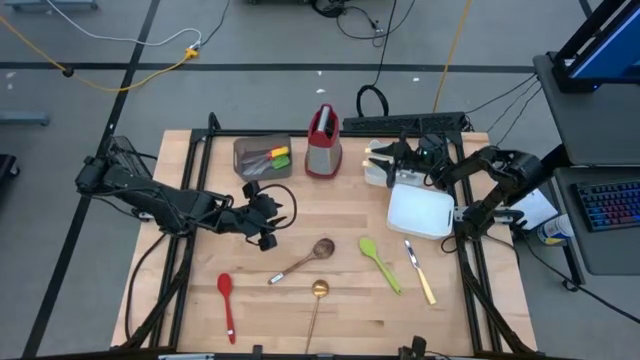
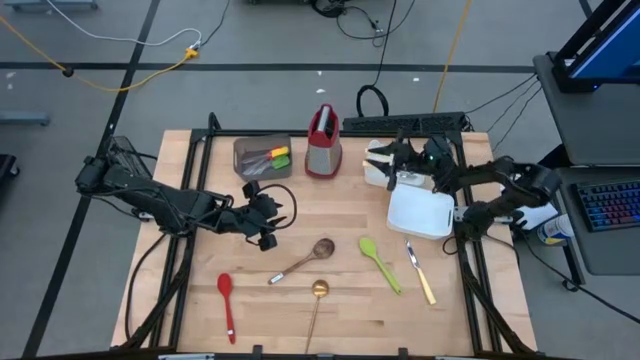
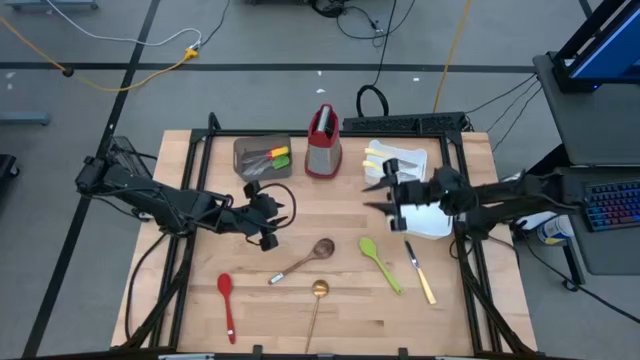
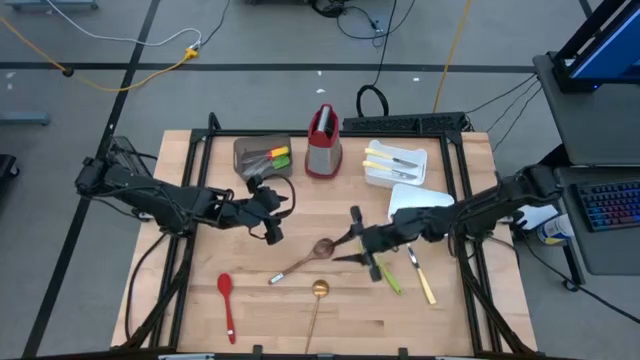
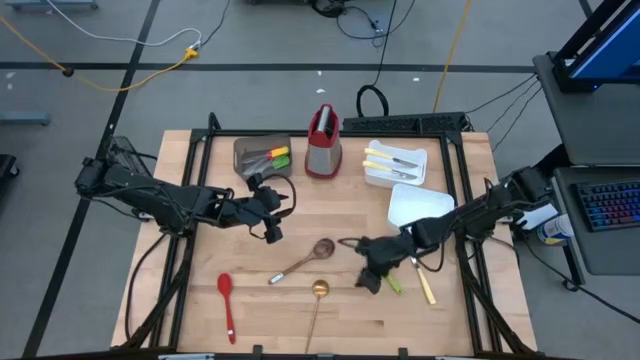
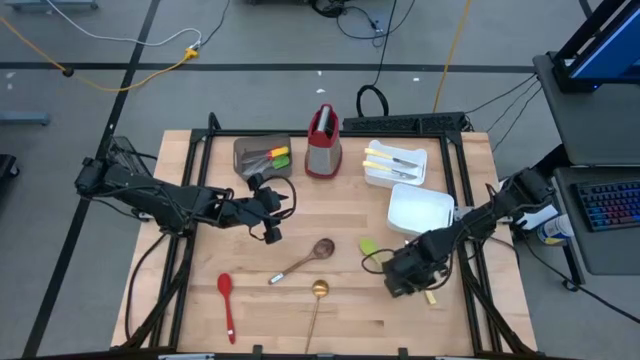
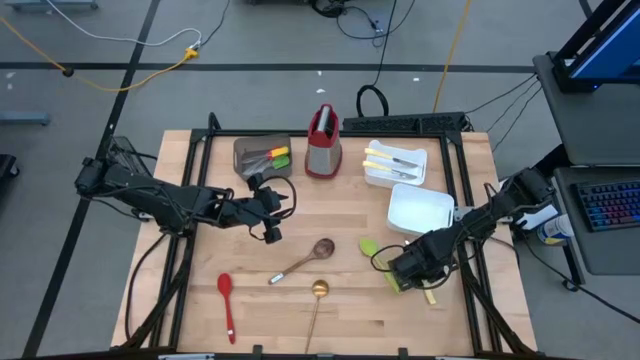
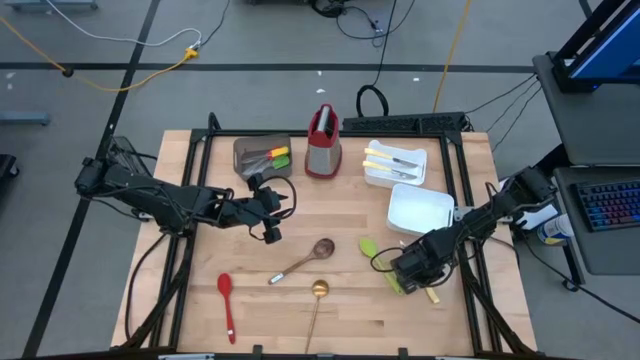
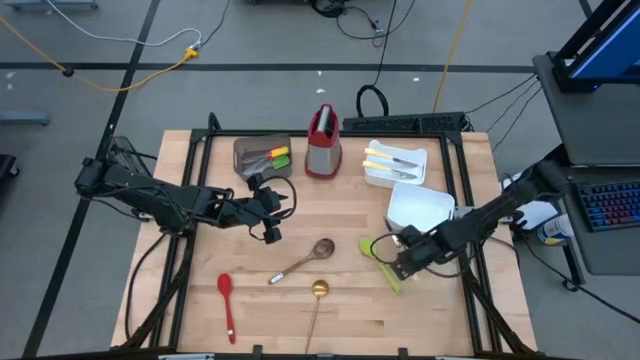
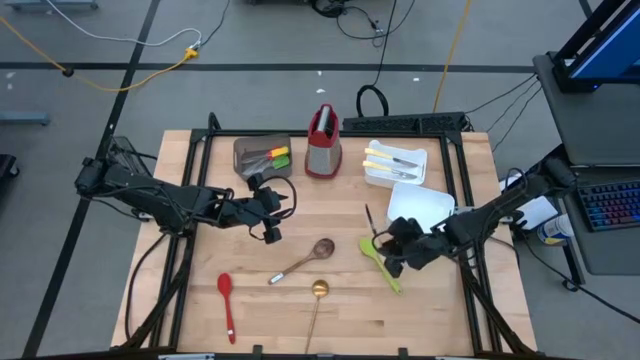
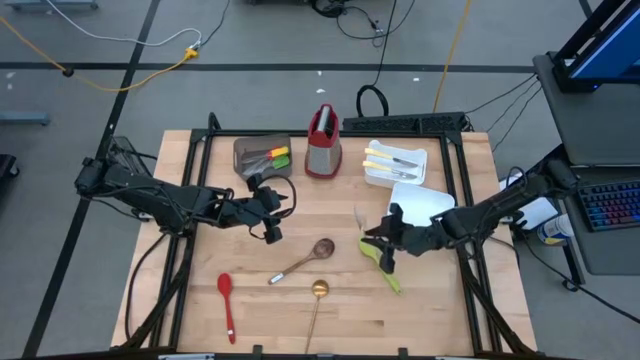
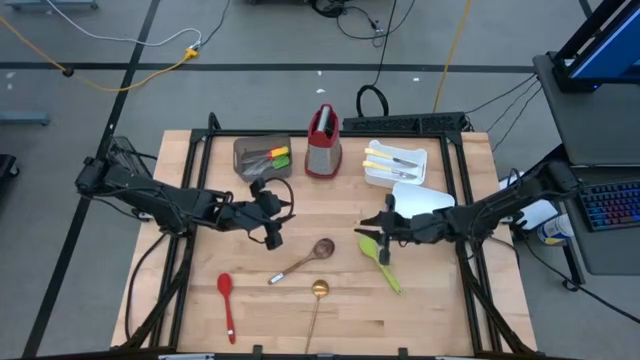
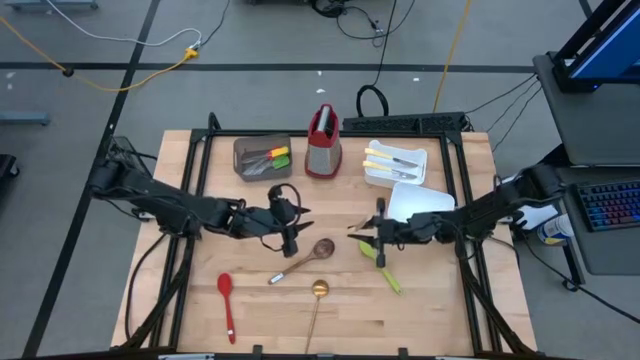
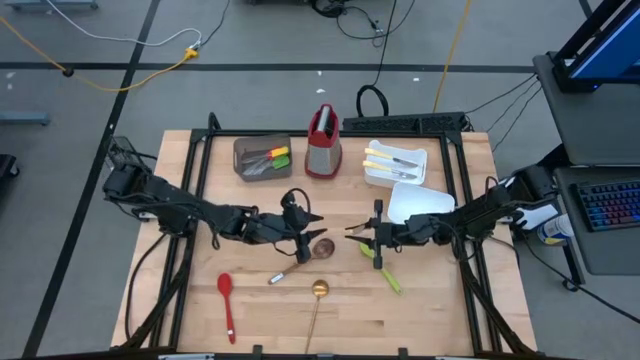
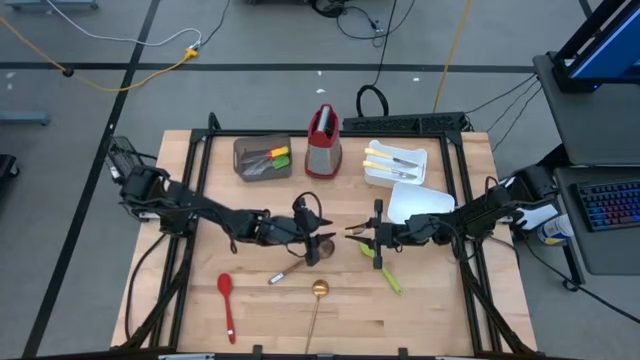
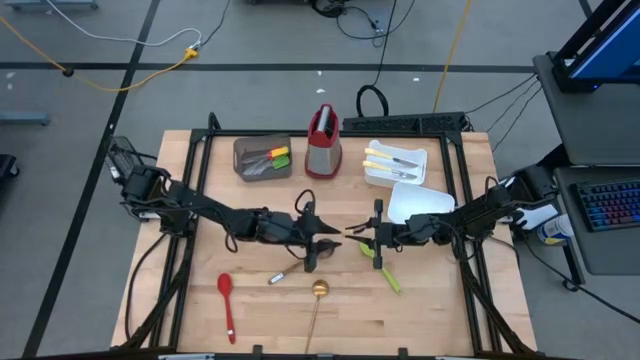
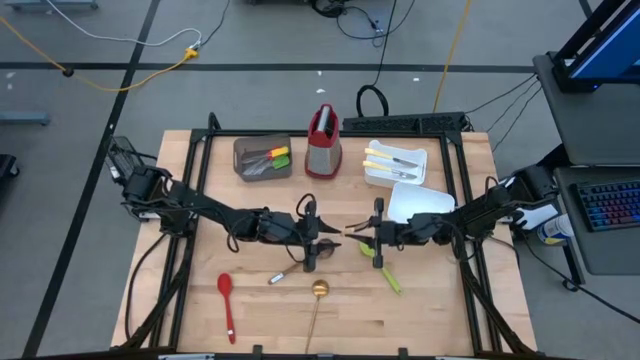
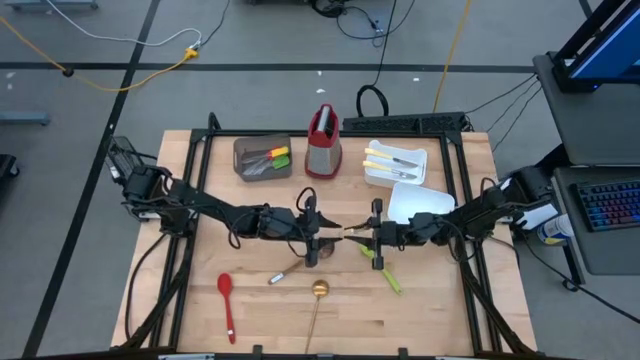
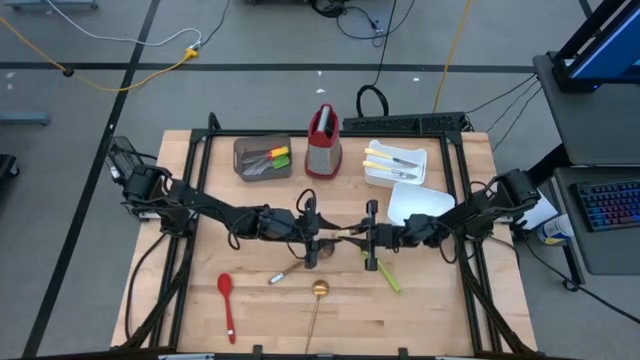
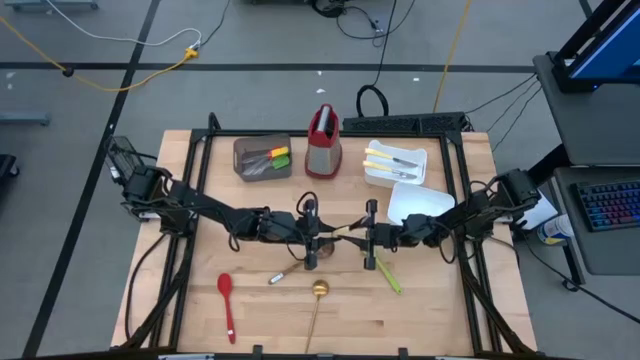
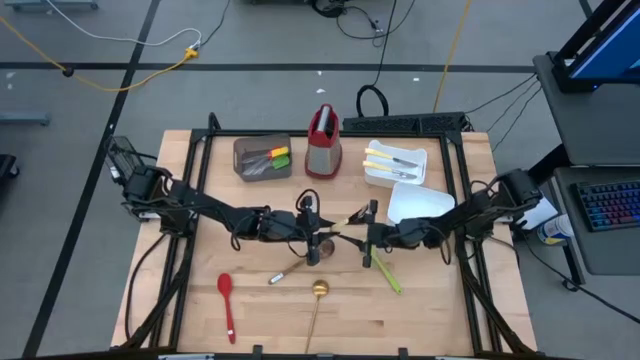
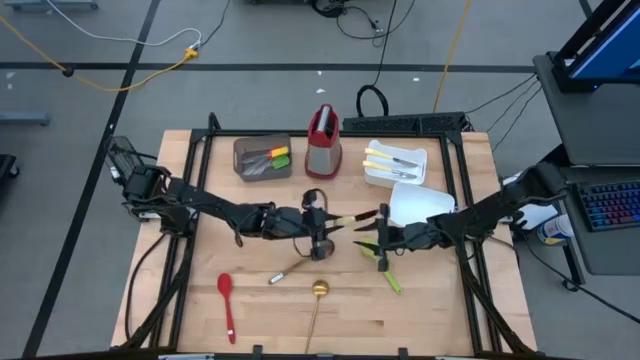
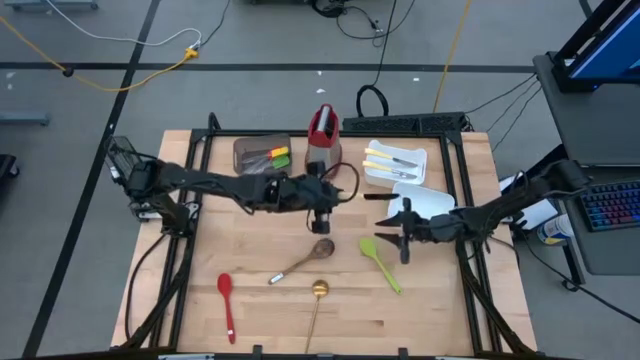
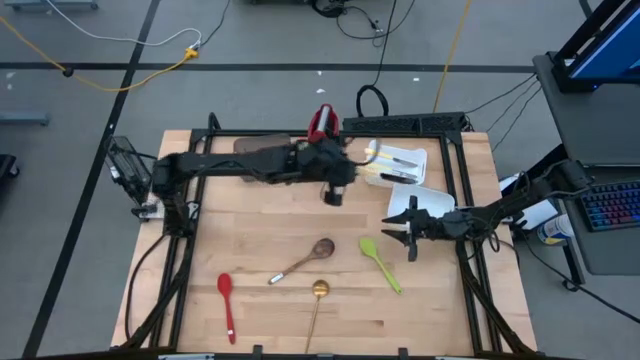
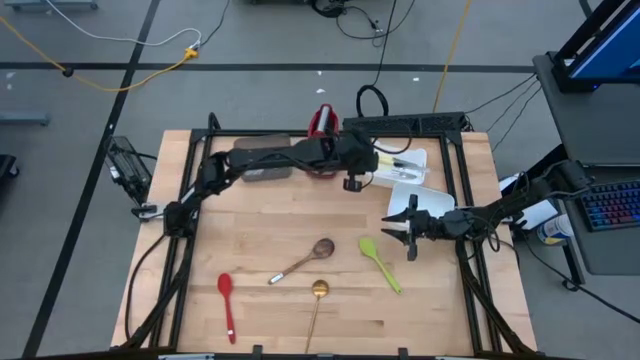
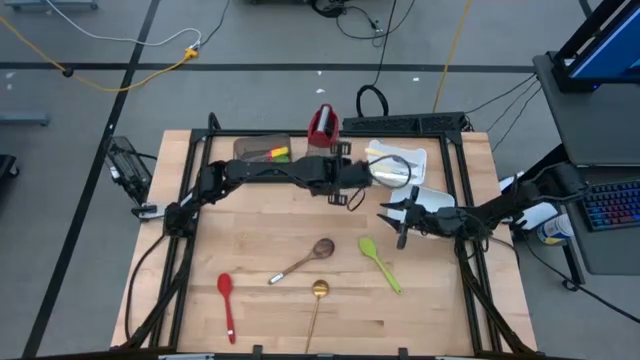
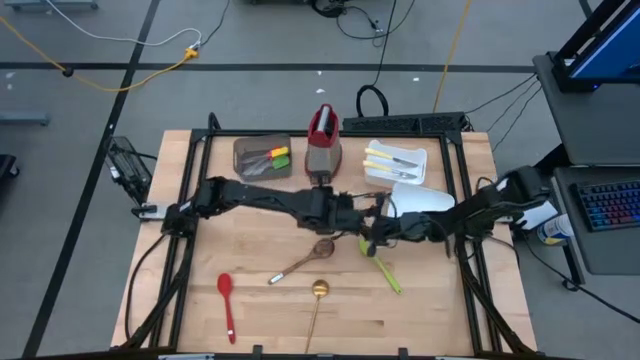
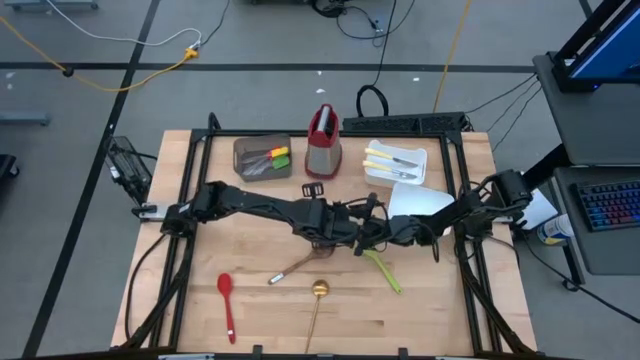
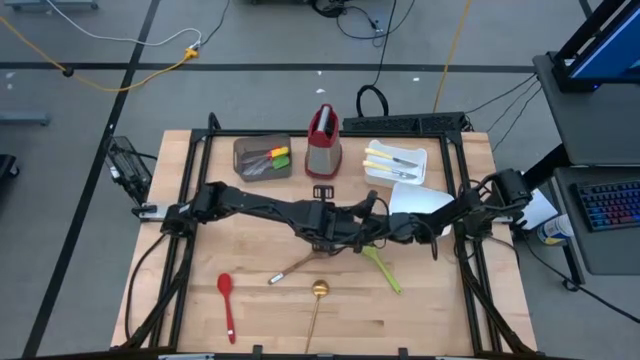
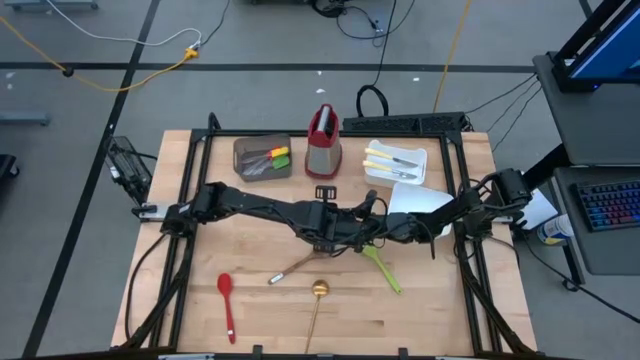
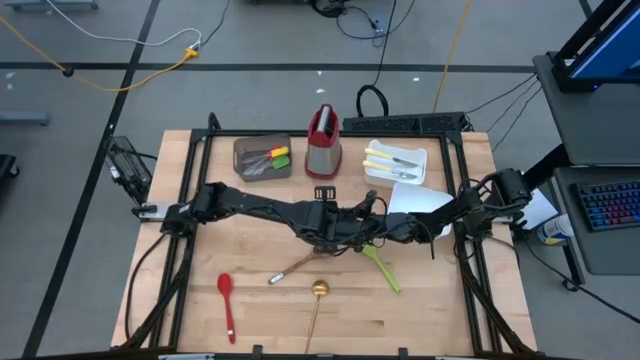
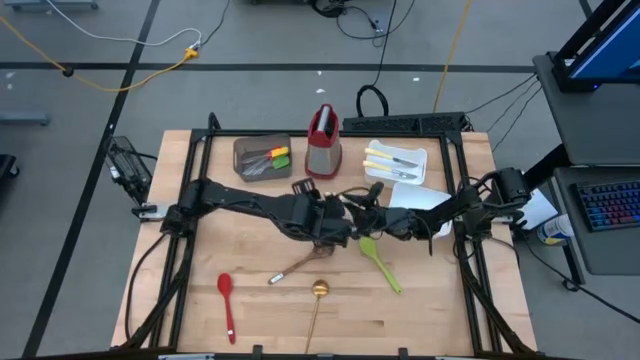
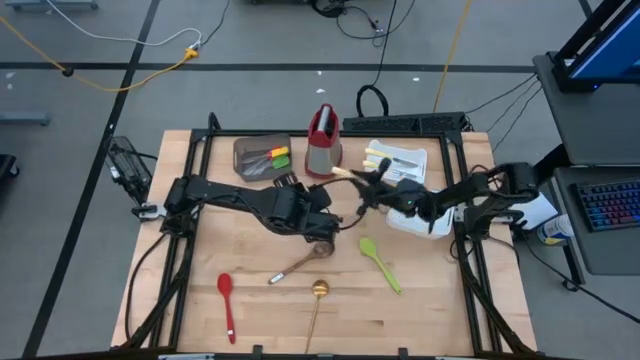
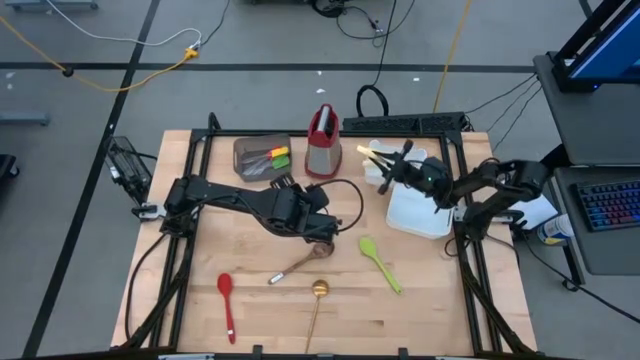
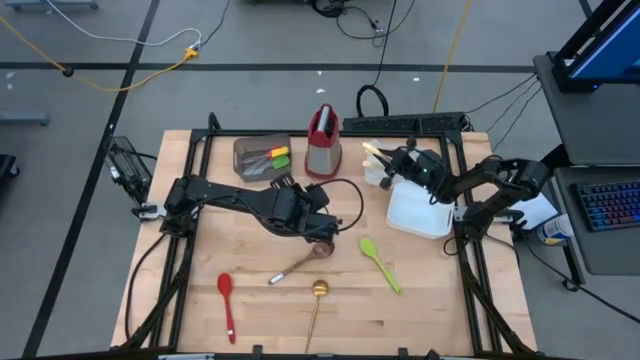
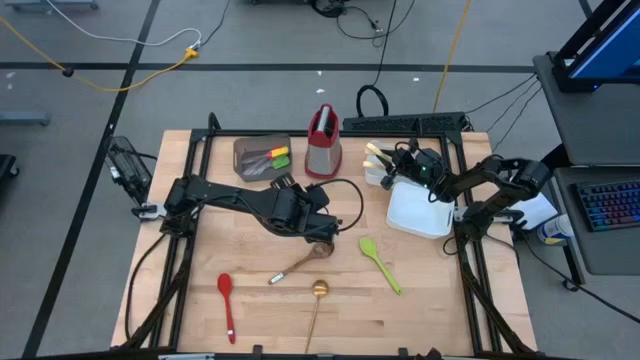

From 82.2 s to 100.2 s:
Task: Pick & Place Kitchen Items
Put the yellow table knife into the top white bin

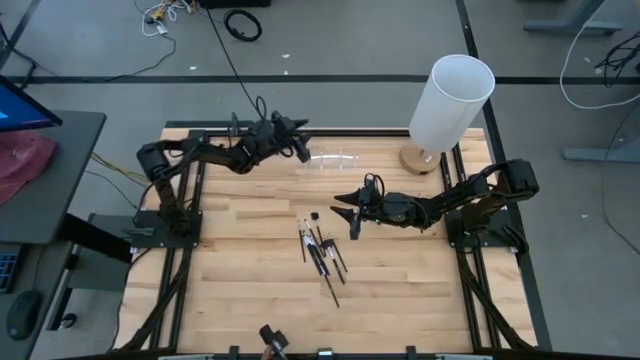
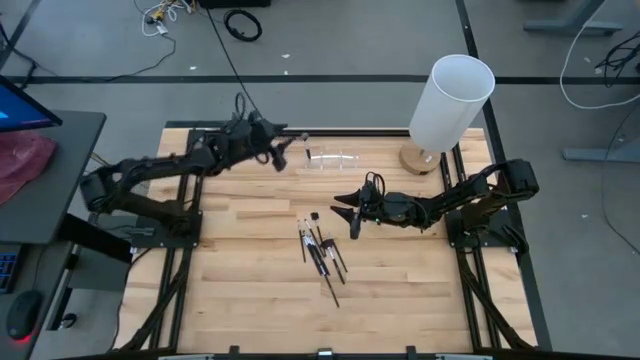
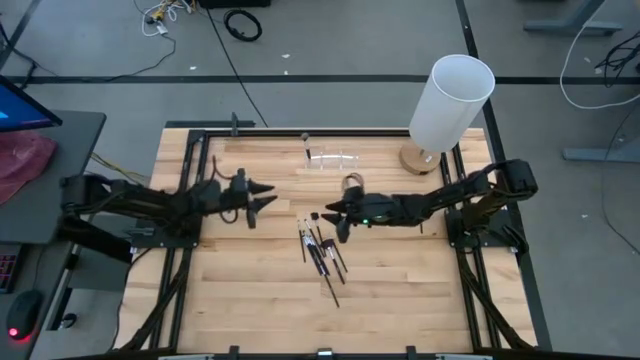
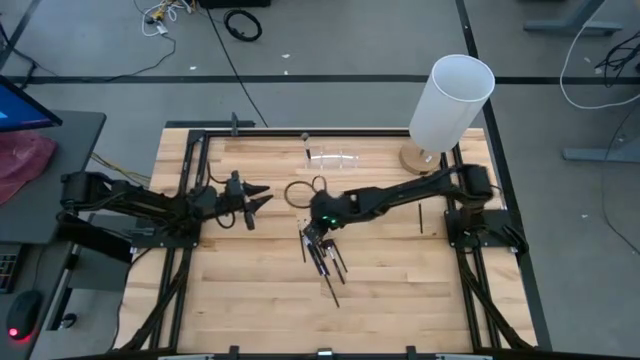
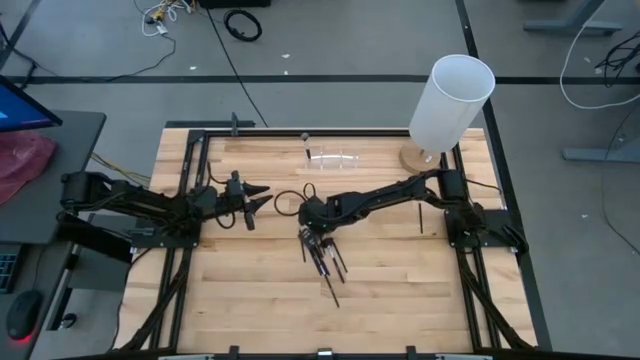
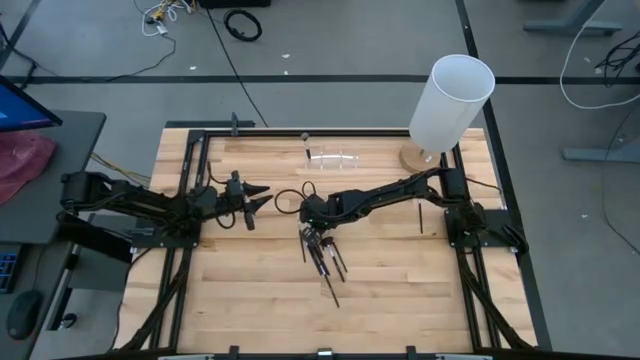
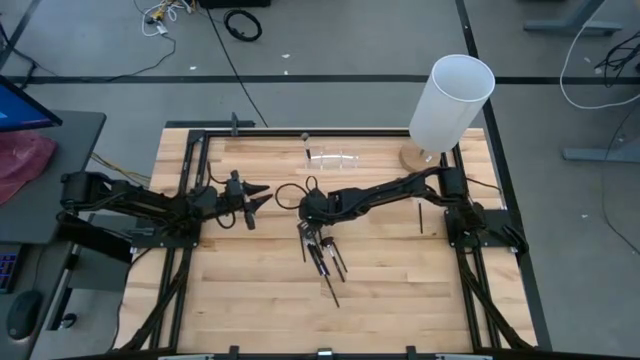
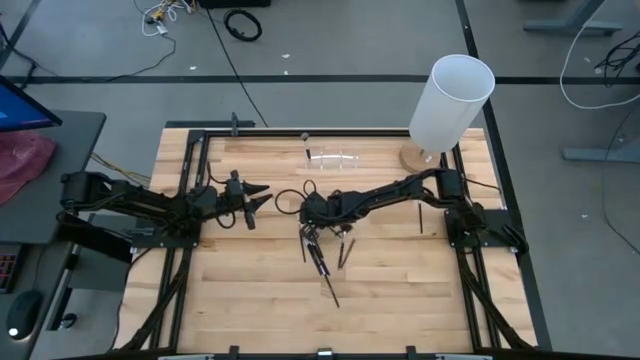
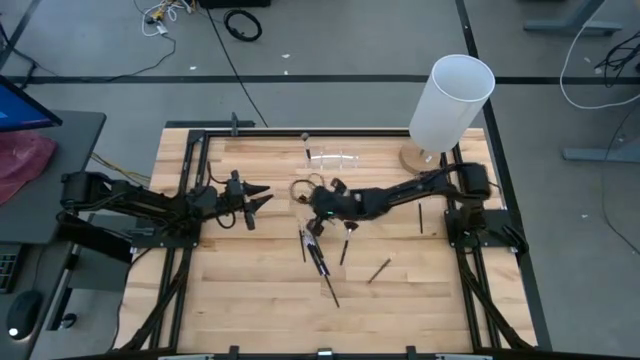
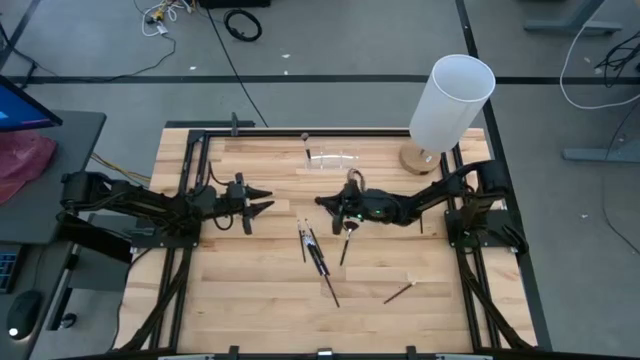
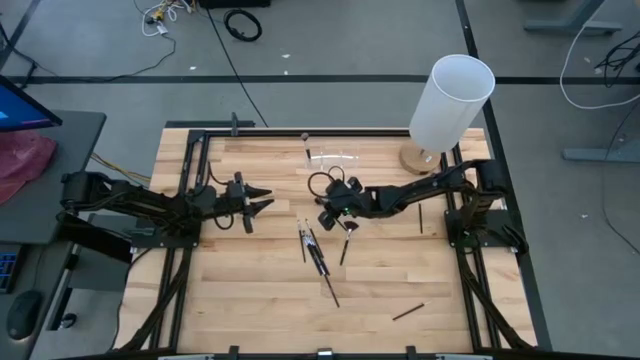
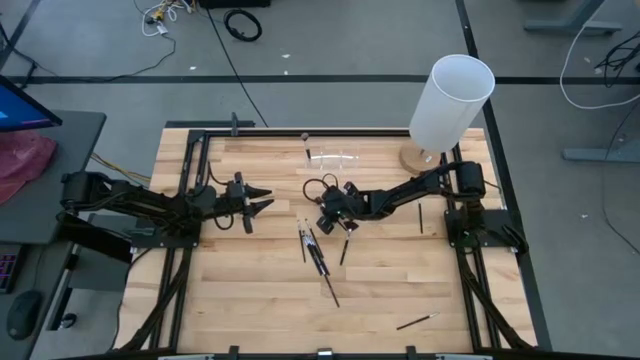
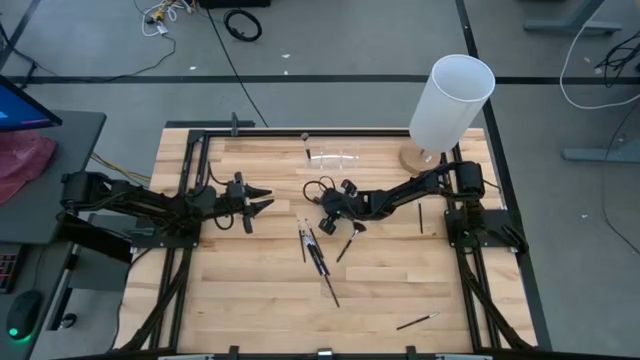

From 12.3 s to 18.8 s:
Task: Pick & Place Makeup Supplies
Put the black makeup brush into the transparent organizer
